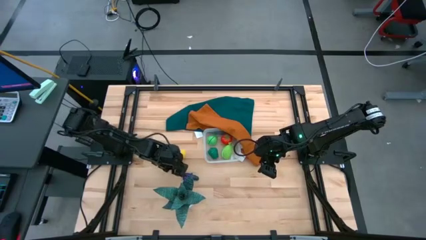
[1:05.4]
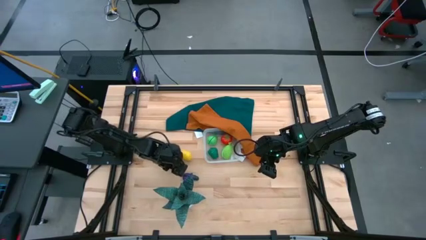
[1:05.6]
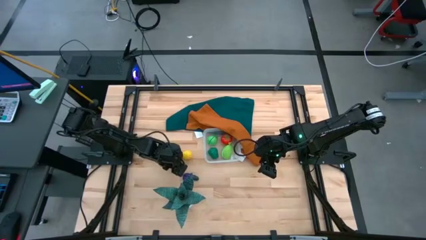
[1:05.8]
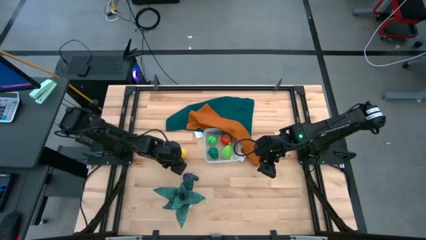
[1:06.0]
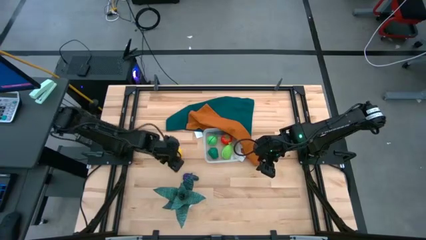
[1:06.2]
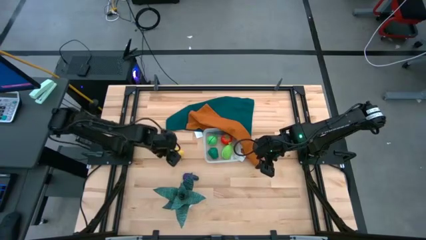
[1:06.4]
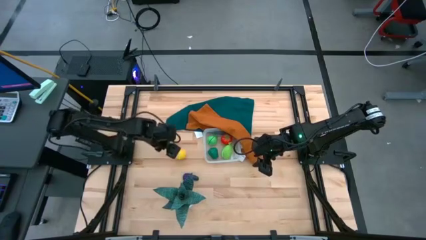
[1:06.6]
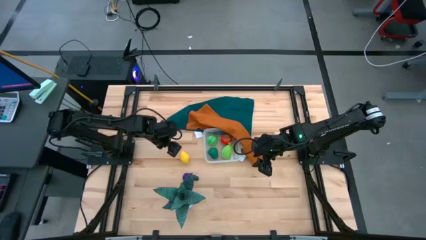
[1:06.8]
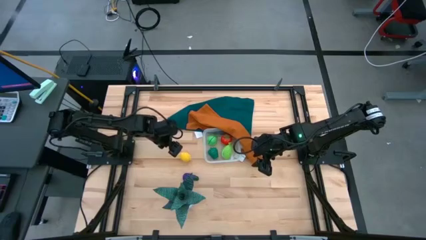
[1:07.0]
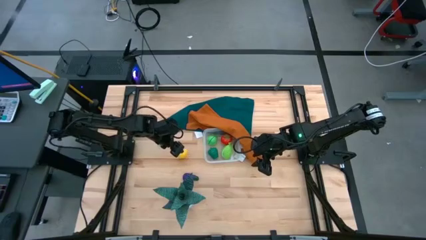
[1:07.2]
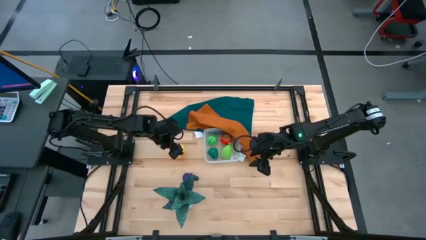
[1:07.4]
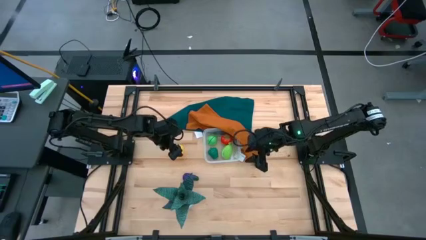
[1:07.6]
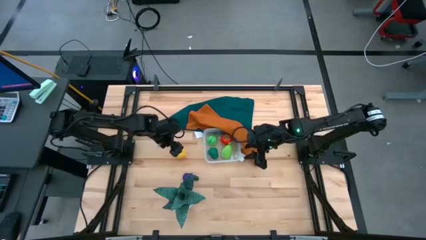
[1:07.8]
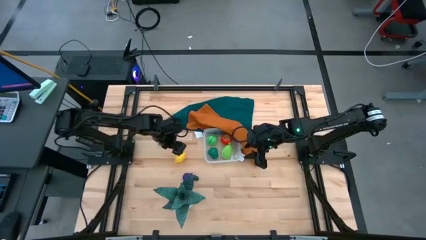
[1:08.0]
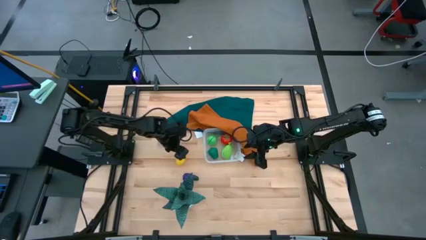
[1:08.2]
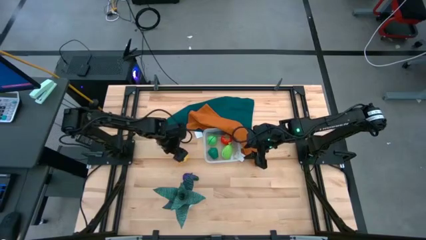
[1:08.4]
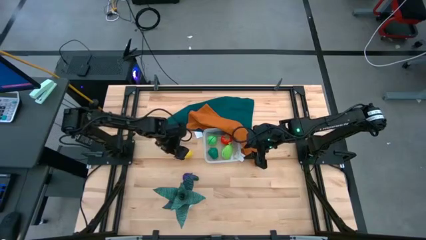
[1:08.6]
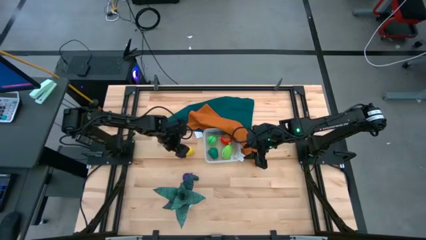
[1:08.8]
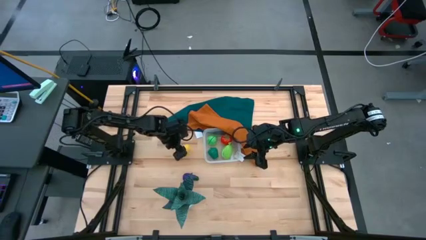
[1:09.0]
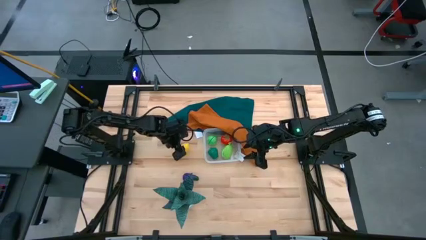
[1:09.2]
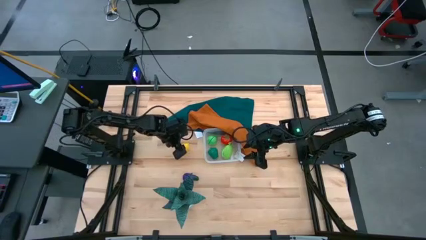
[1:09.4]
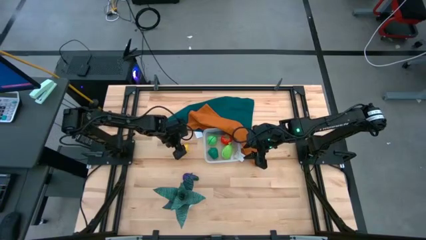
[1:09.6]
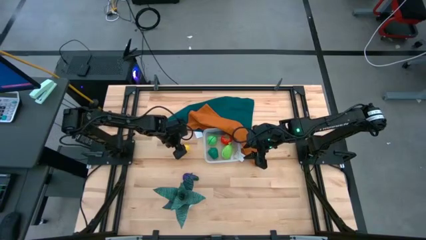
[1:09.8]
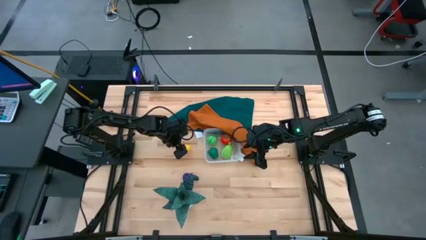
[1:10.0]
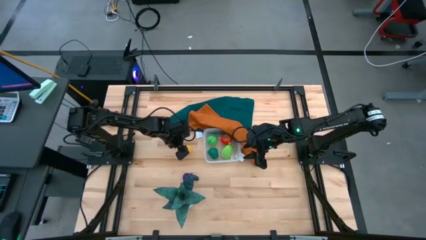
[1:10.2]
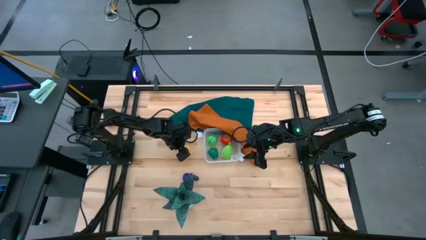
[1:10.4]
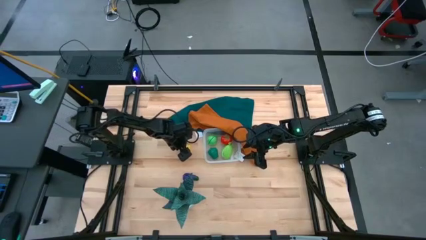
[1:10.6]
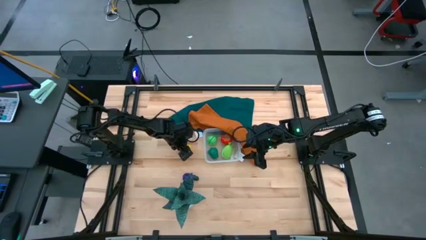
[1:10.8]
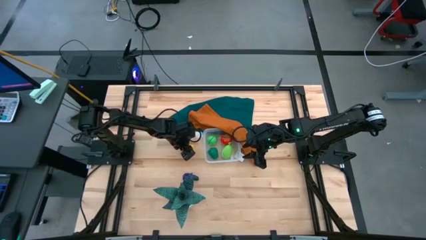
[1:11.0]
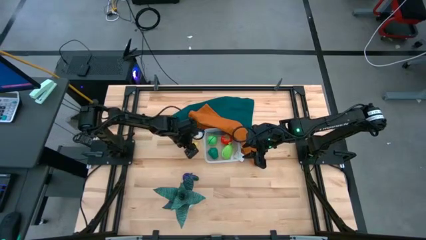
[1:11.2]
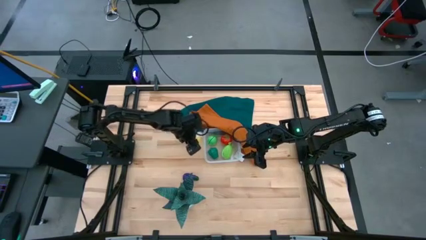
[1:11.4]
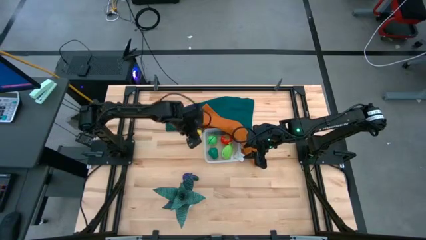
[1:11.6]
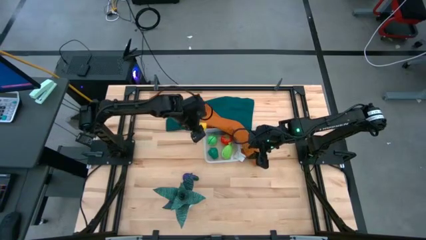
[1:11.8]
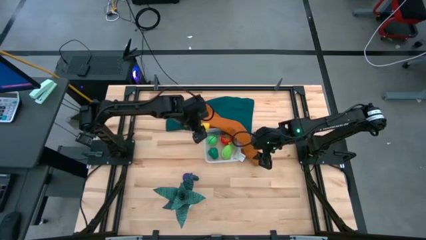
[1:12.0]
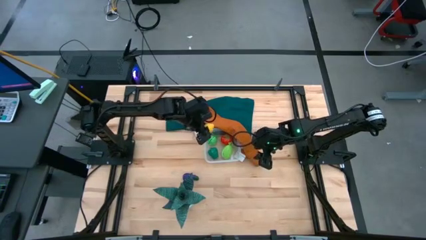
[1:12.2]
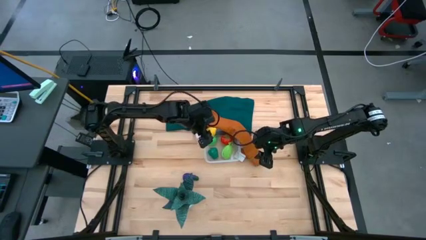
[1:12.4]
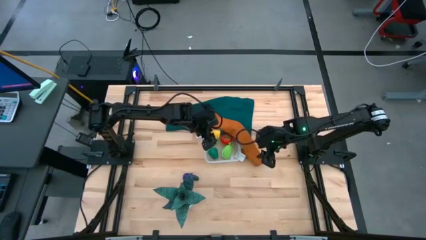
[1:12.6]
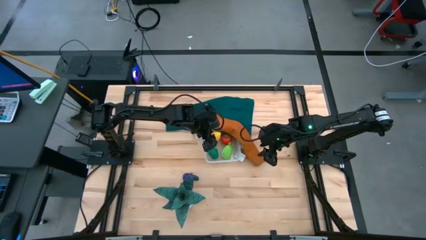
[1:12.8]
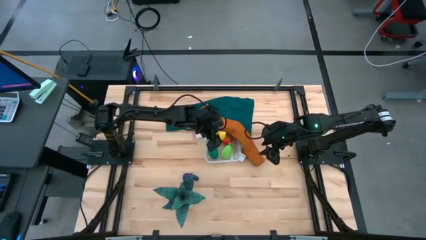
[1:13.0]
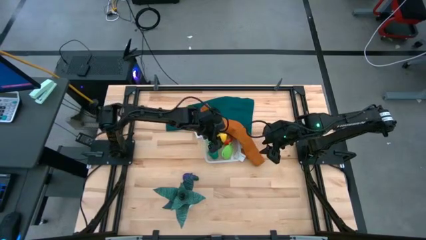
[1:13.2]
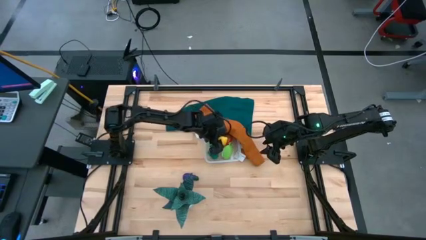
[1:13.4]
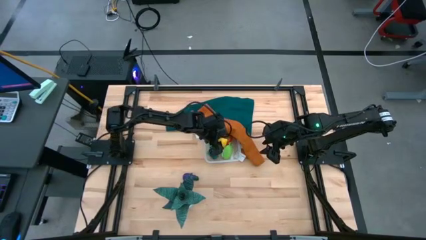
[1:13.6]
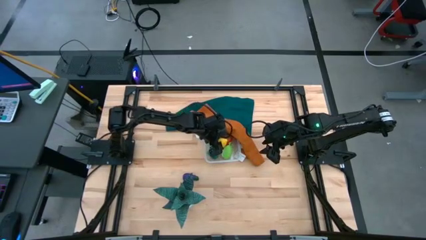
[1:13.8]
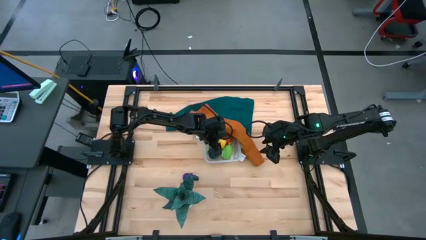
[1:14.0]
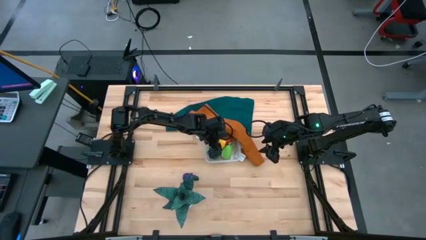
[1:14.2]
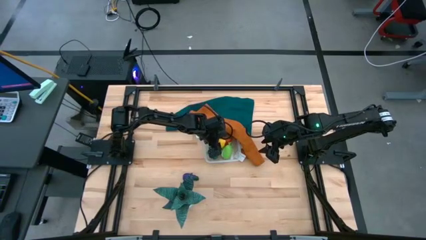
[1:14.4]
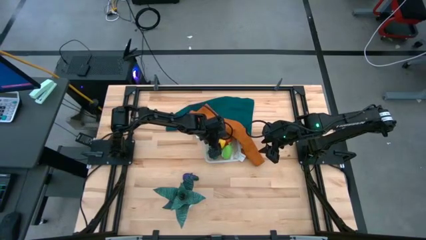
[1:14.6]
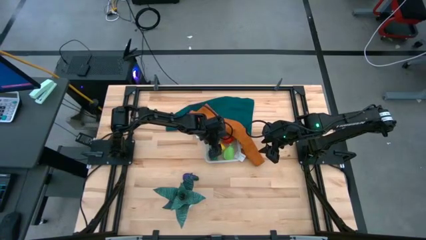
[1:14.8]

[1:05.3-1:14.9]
Task: Pick and placing Produce into tupperware
Put the lemon into the transparent bin

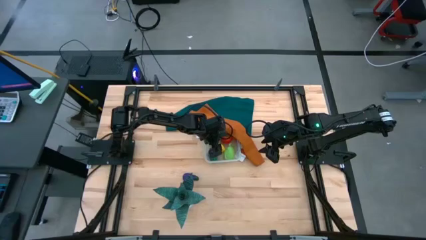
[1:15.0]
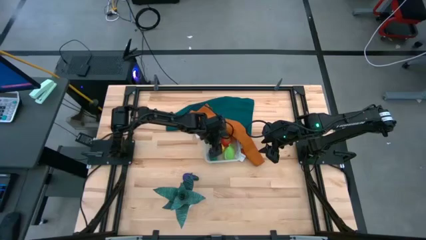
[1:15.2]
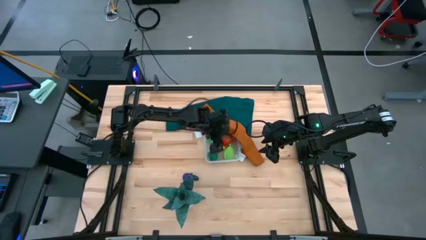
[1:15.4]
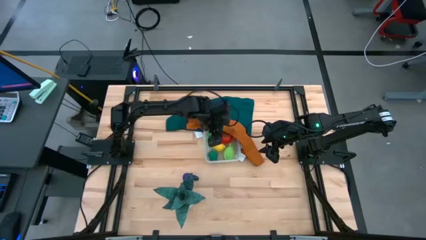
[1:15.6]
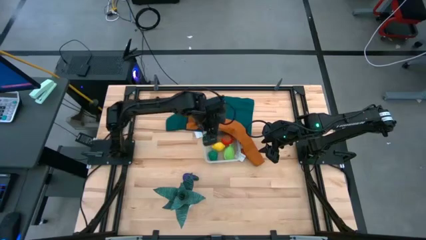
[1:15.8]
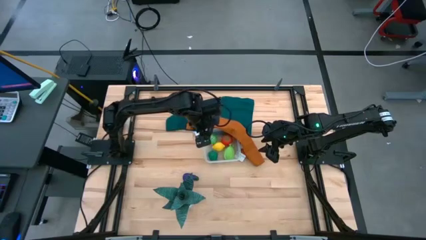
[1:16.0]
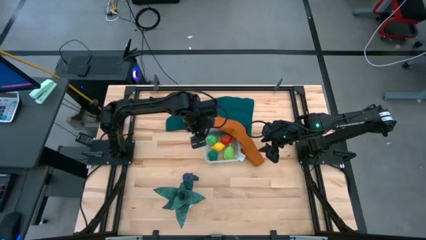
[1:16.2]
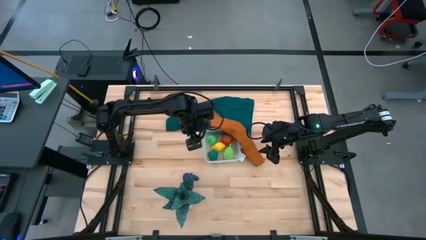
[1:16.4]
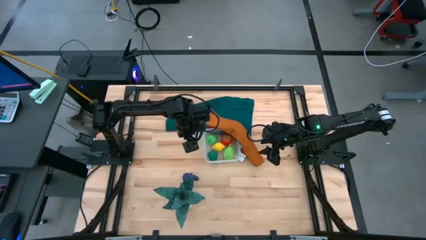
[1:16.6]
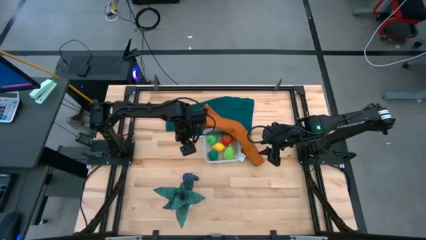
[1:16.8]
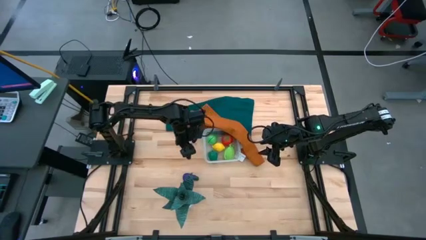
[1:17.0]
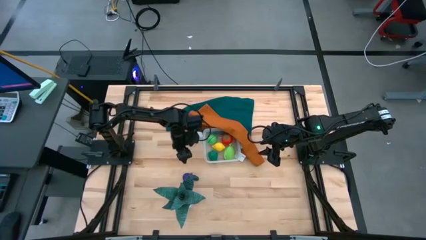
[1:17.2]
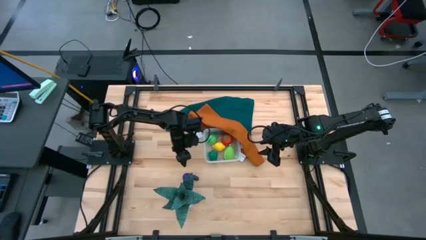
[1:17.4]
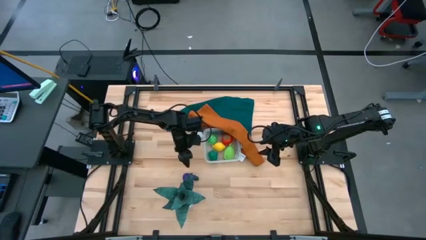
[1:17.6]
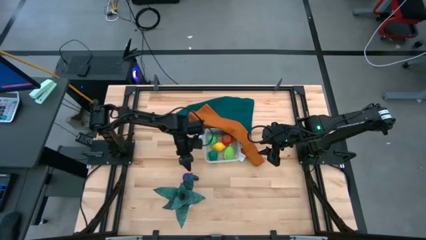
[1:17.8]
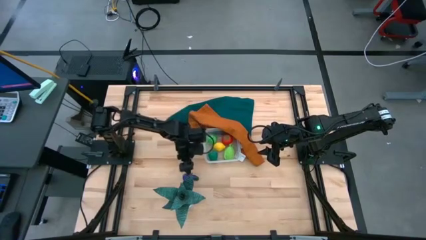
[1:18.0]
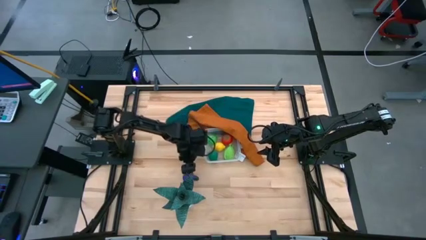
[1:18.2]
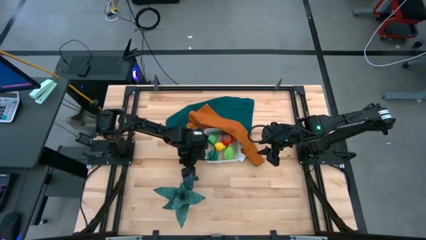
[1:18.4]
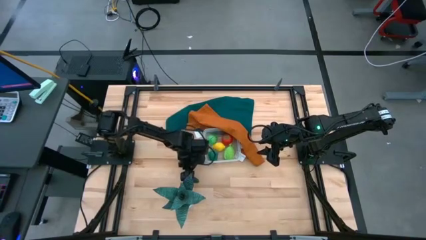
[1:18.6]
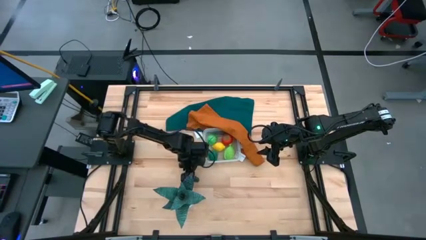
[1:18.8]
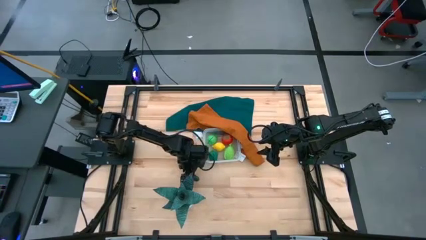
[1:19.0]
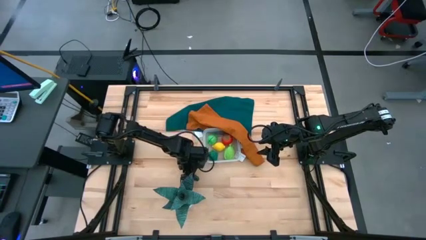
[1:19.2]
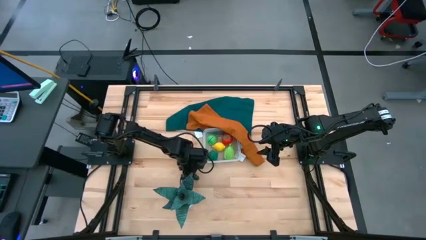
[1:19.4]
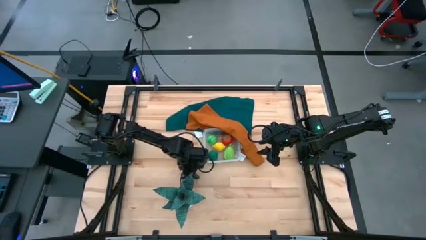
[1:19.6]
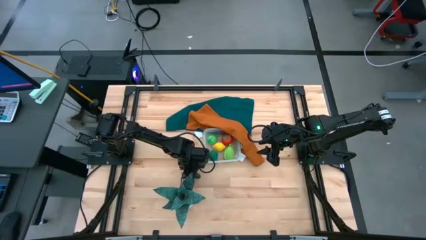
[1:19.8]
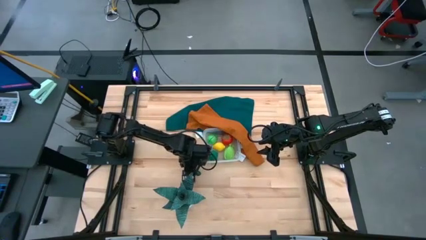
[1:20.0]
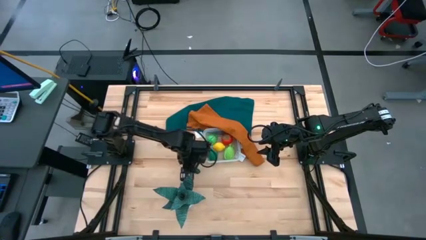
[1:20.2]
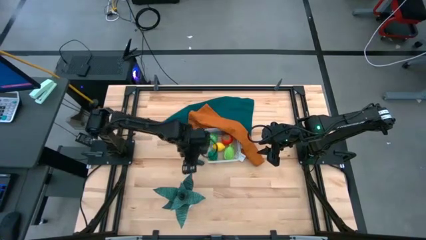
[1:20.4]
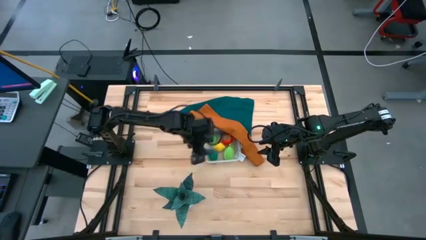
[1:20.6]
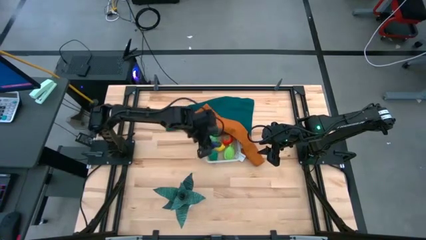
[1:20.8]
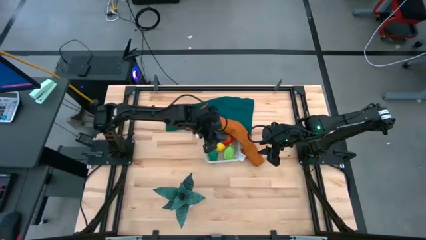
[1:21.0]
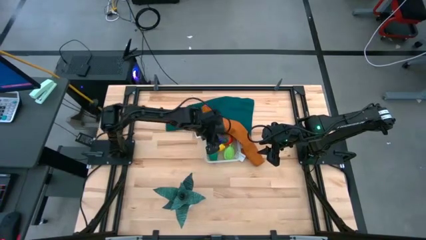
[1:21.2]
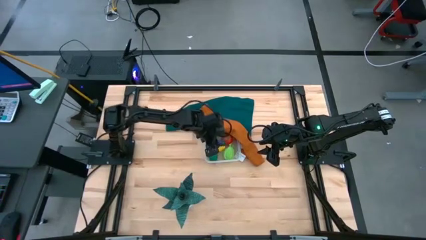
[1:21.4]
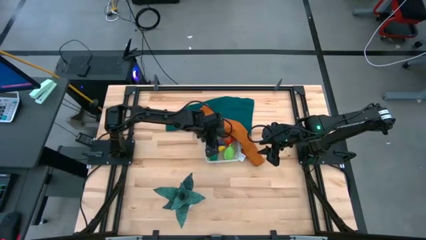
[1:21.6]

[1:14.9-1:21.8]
Put the eggplant into the transparent bin
